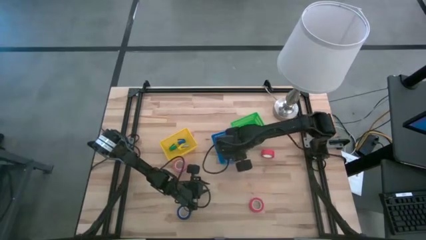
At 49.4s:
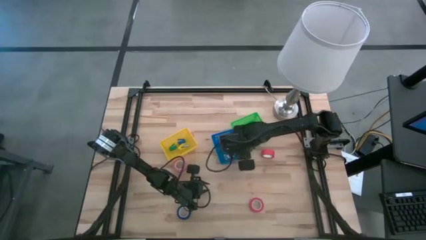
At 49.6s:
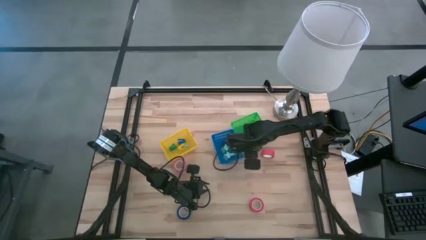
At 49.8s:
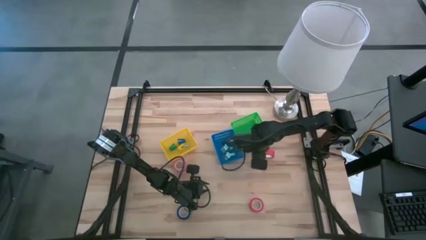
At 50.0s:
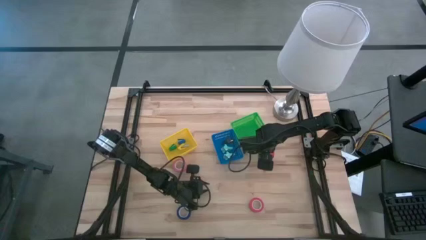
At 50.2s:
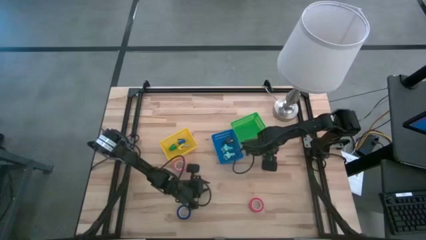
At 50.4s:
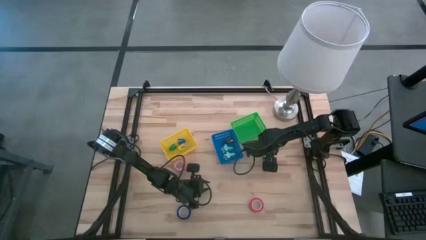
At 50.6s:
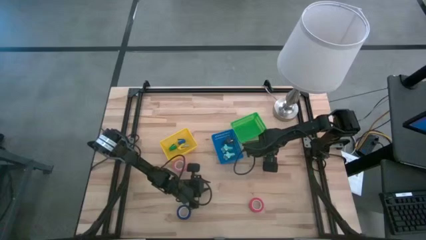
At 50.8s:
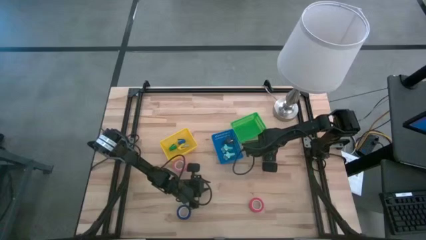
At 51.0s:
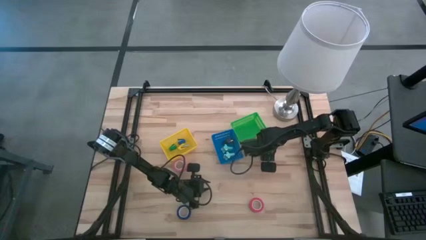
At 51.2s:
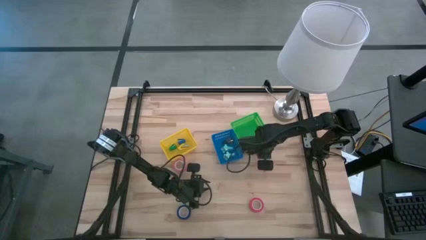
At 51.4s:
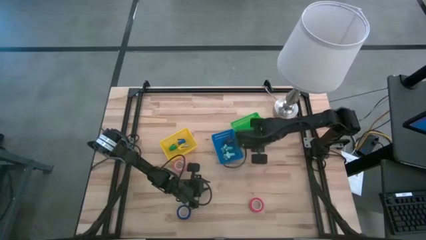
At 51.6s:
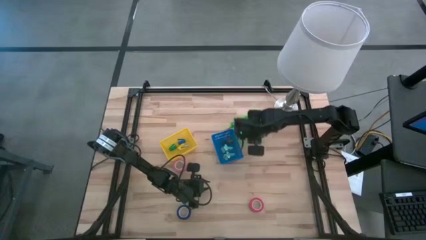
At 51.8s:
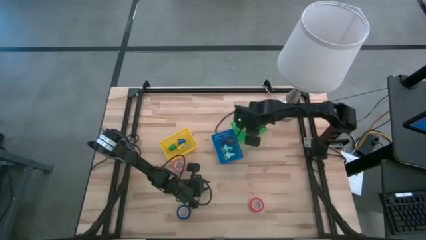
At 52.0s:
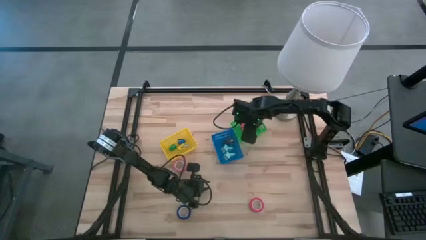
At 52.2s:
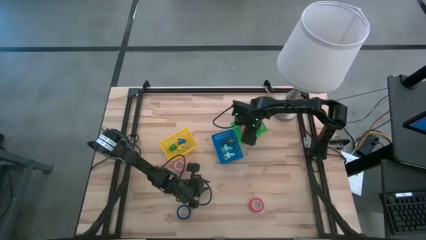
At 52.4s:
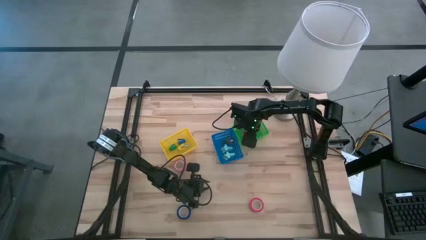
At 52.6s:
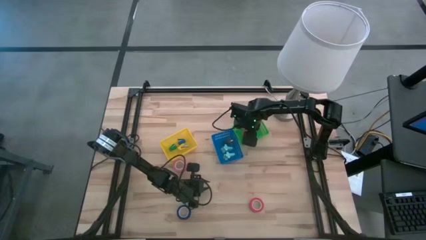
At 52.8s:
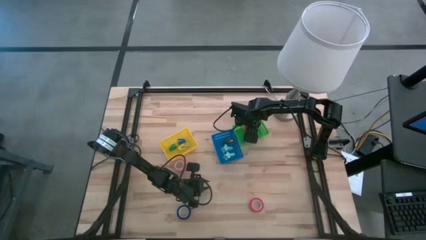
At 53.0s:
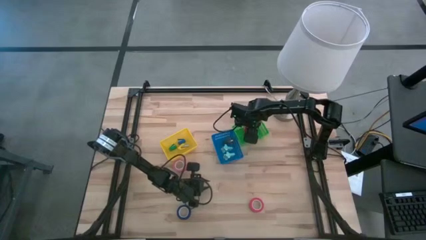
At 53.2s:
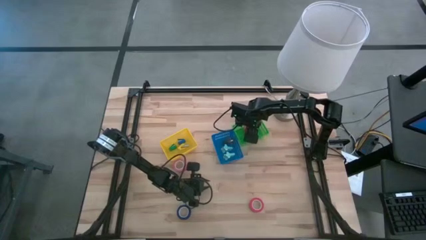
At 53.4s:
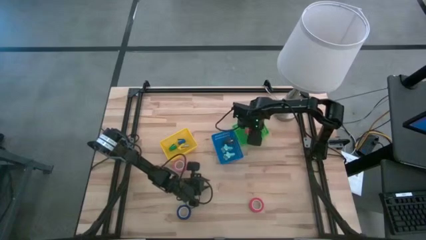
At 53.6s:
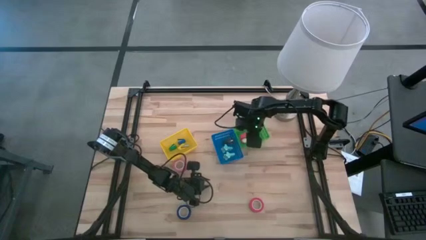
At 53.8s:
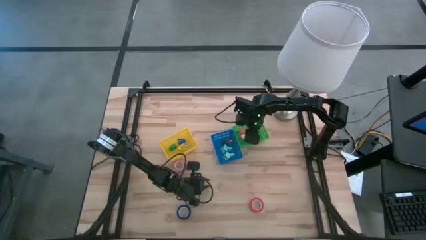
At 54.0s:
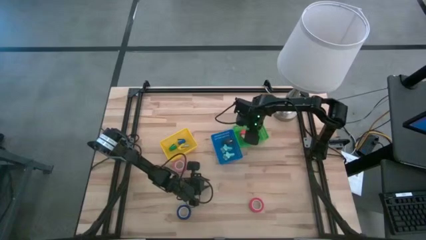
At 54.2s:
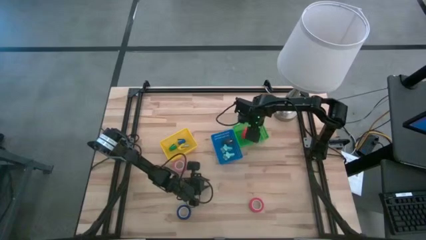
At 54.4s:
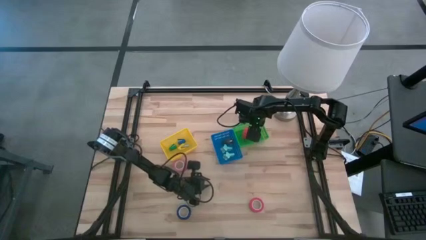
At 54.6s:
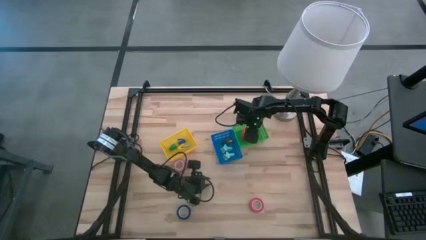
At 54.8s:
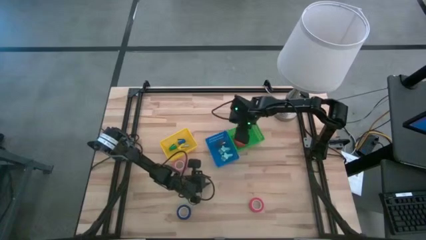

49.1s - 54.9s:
Task: Pick and place Stapler, Stapler remover, tape
Put the top orange tape into the green bin

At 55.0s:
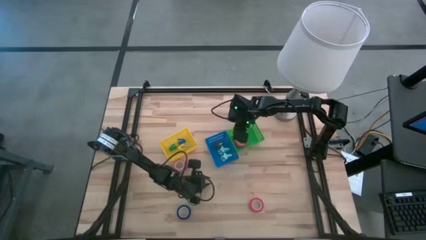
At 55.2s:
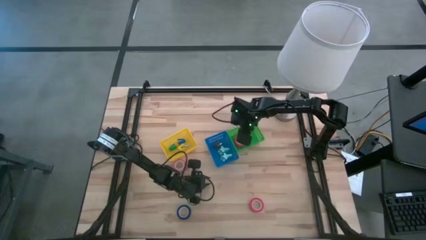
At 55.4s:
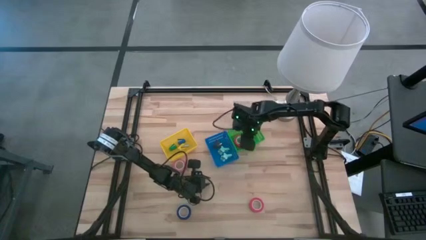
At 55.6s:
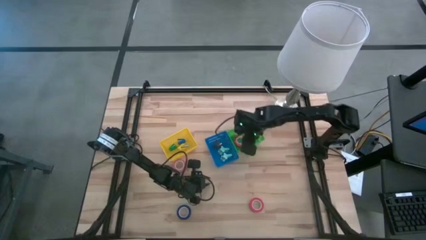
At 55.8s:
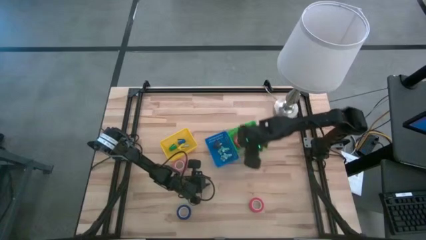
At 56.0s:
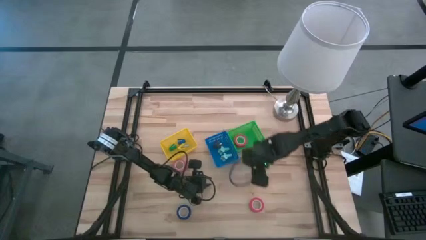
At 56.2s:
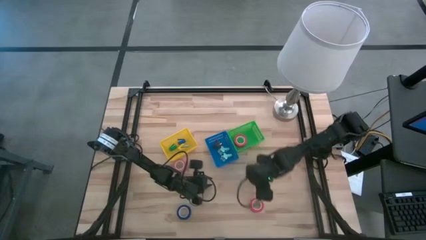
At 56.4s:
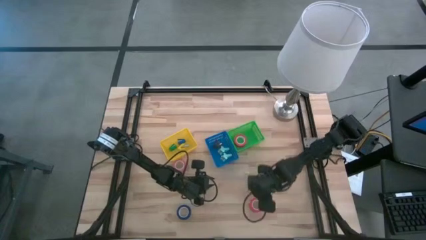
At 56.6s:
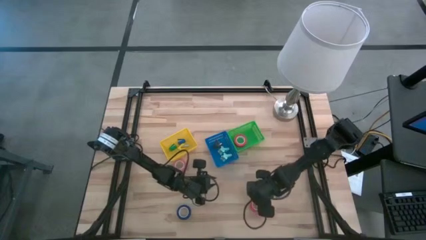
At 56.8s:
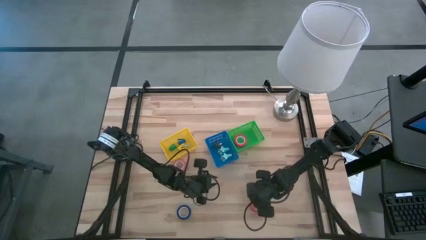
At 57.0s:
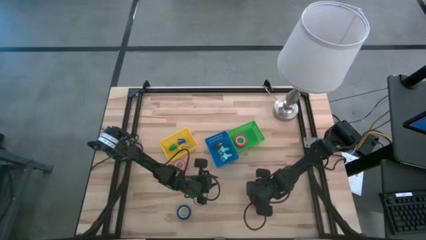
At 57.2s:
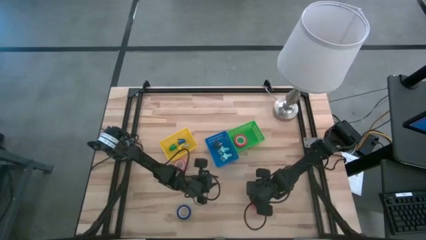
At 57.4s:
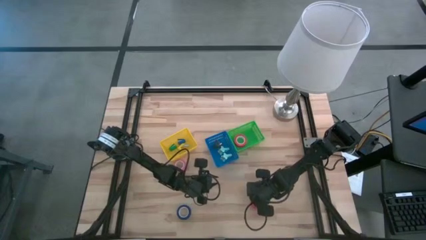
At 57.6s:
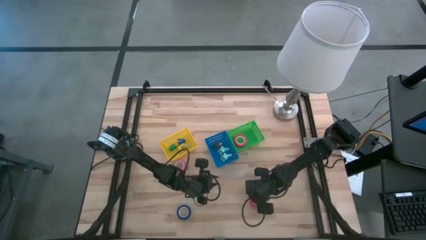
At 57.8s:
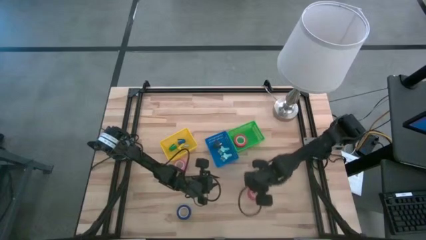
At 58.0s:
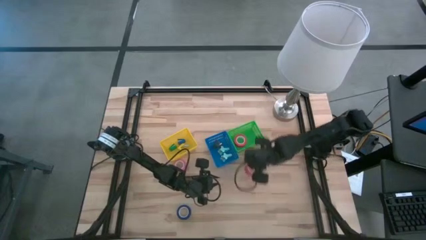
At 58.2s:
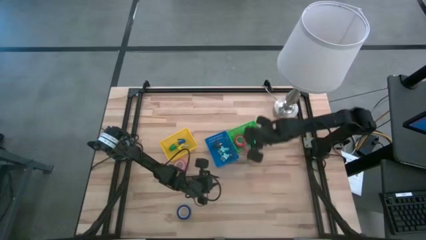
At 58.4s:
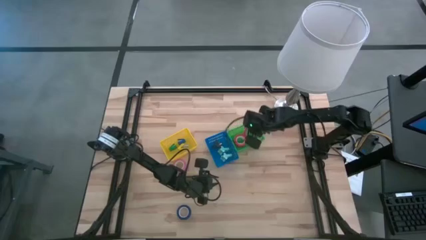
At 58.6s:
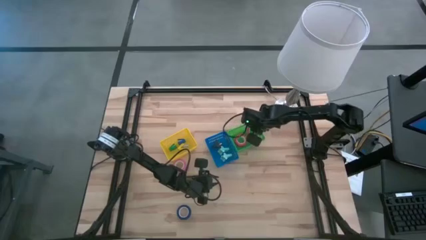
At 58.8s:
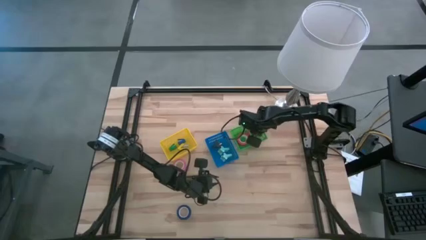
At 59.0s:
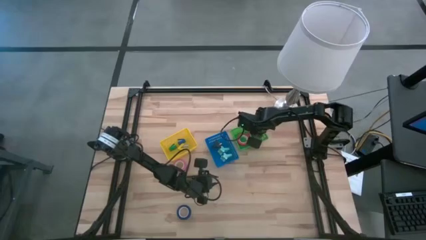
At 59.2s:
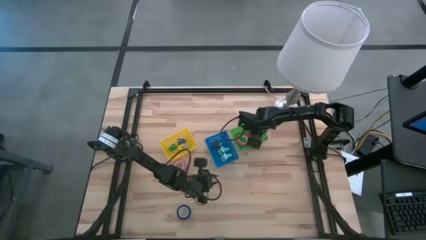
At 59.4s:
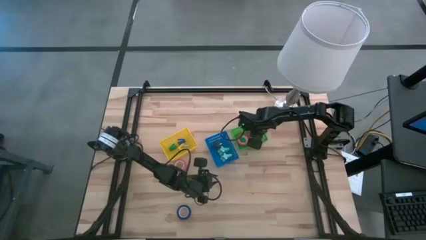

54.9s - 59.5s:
Put the orange tape into the green bin

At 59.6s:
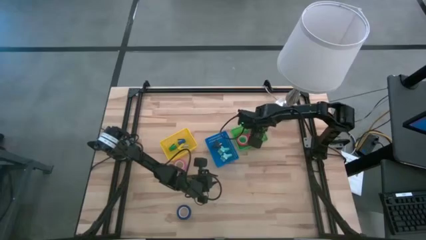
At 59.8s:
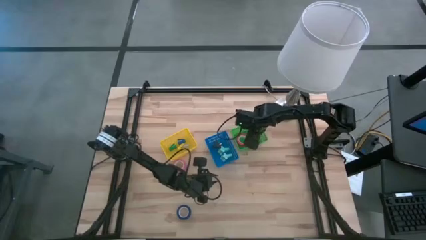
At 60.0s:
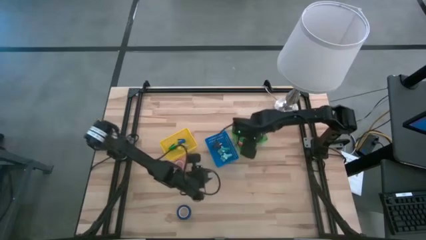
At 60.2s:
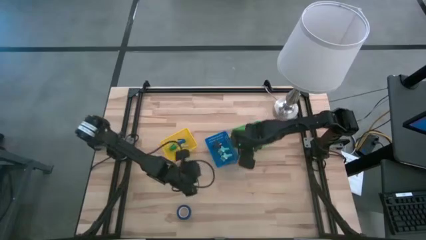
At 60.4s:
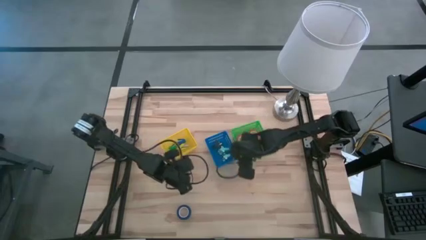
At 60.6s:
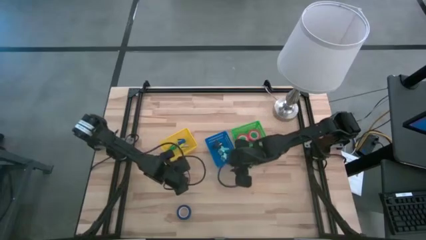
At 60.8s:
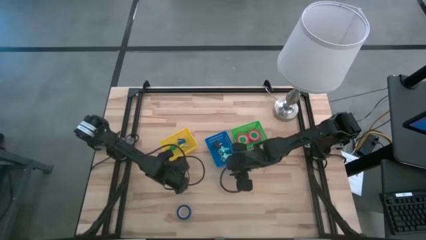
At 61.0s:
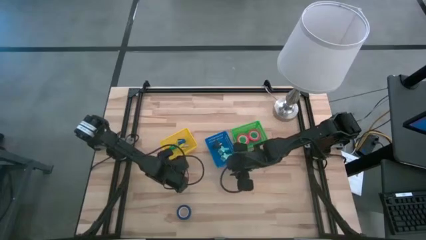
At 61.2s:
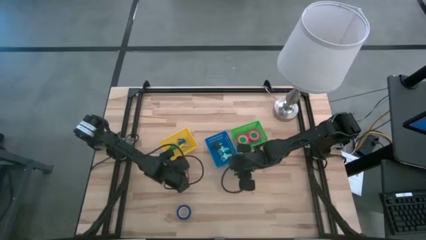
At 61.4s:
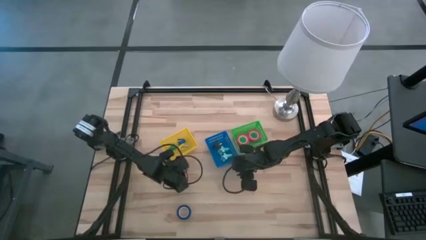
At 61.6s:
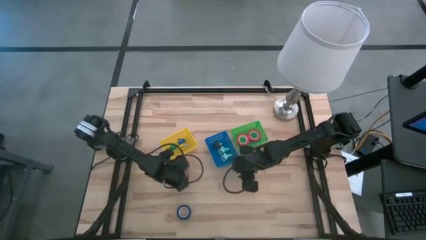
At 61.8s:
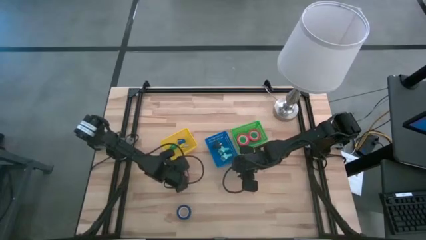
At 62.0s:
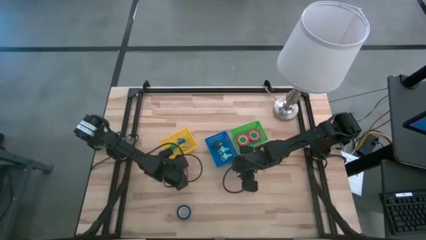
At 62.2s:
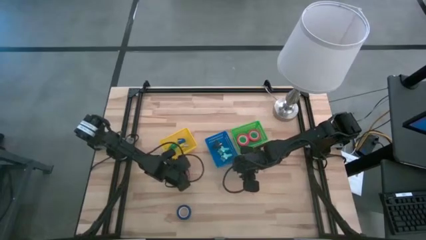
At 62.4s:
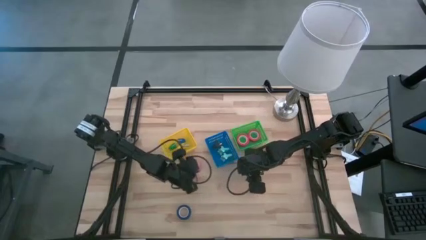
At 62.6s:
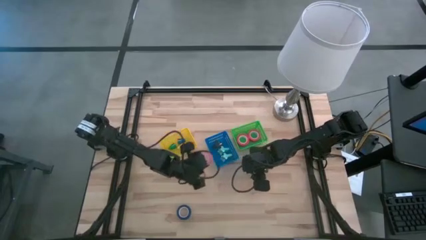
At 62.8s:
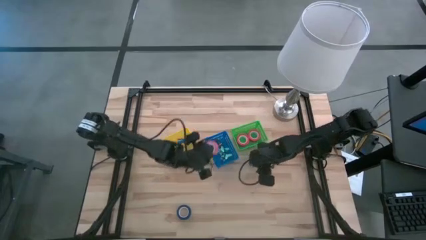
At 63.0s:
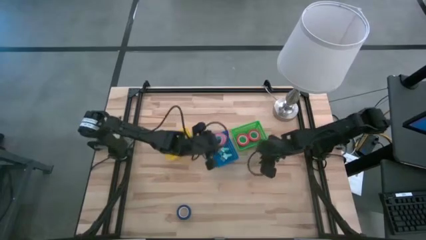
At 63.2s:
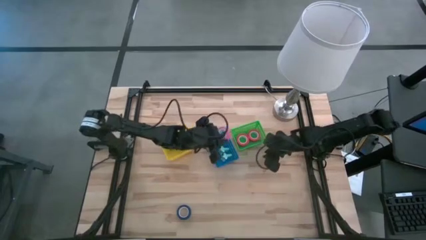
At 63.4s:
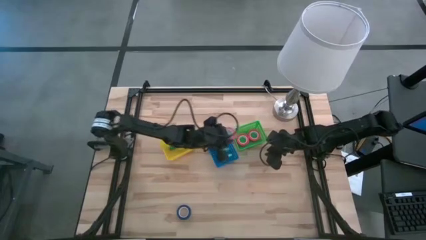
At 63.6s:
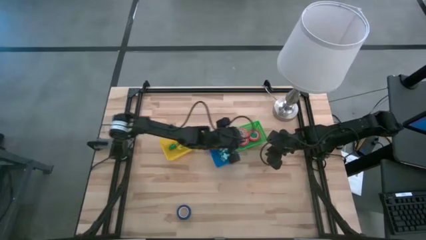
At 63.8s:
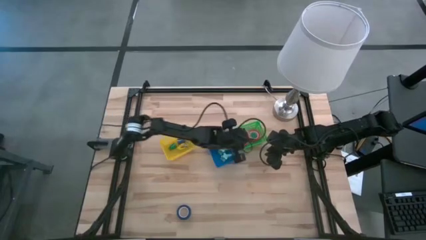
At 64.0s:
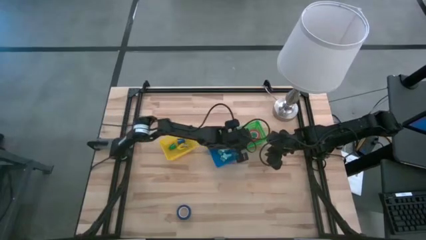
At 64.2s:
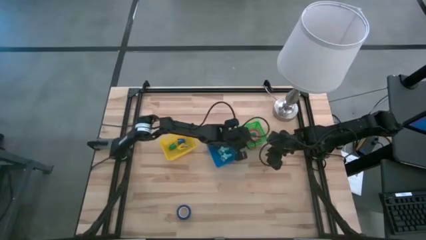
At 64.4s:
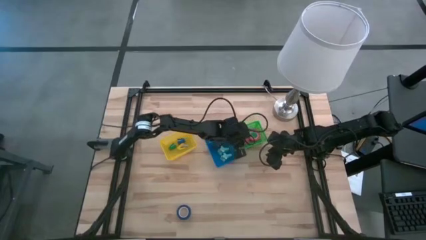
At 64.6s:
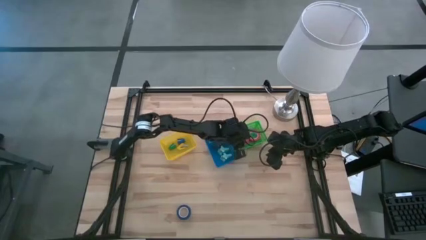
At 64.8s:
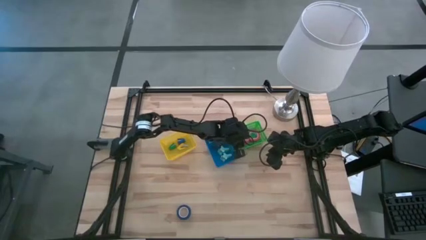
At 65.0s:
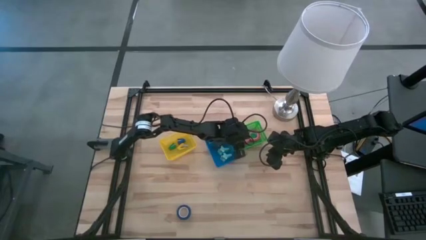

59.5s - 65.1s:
Put the pink tape into the green bin

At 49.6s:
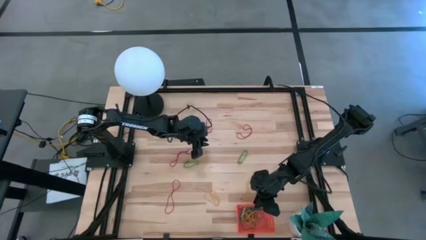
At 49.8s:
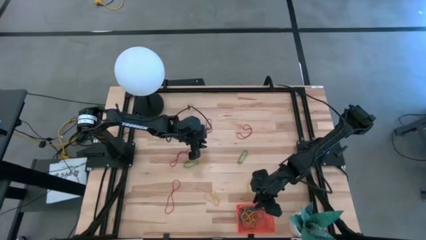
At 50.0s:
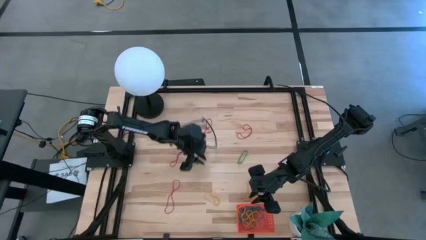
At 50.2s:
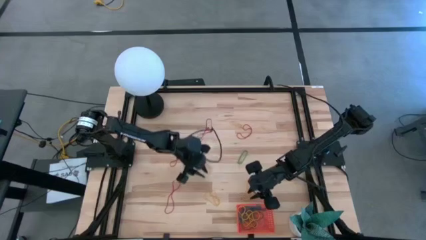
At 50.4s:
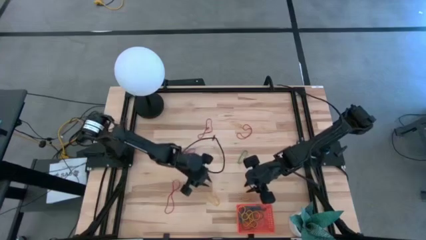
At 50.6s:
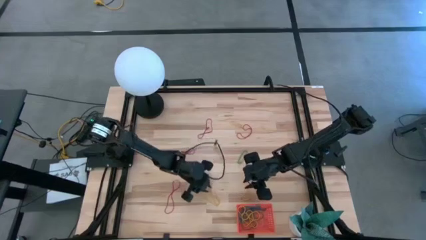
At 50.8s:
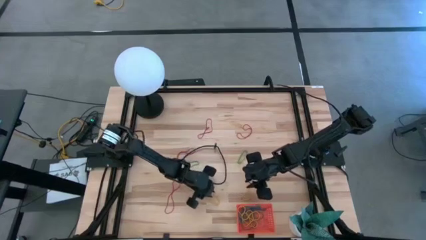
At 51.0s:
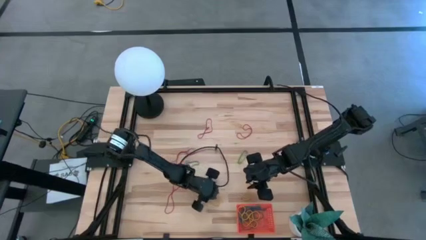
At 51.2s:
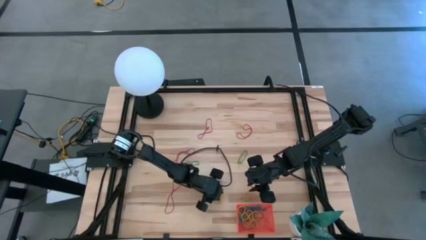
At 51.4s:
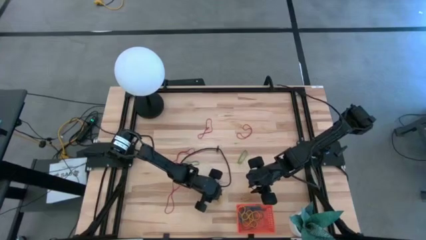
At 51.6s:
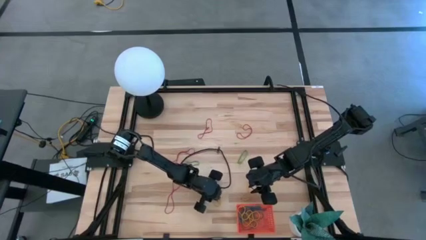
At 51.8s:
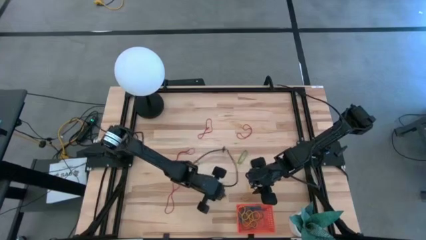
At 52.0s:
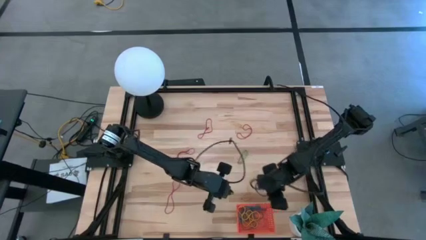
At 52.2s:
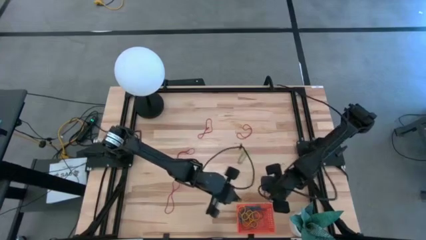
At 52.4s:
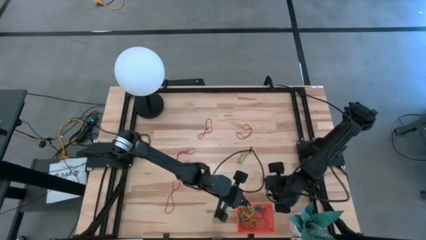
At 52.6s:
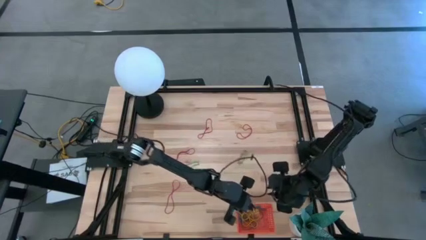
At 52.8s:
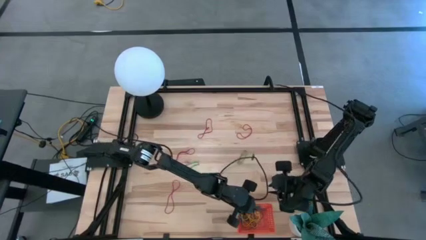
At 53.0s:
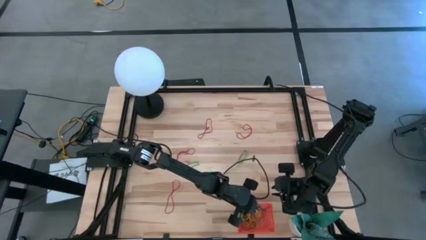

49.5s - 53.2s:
Task: Pick and place items into bin
Put the yellow rubber band into the orange bin
